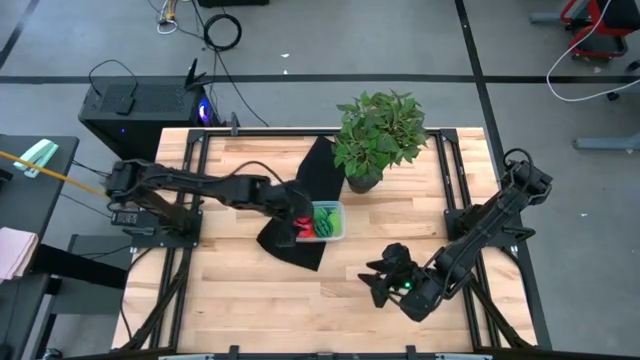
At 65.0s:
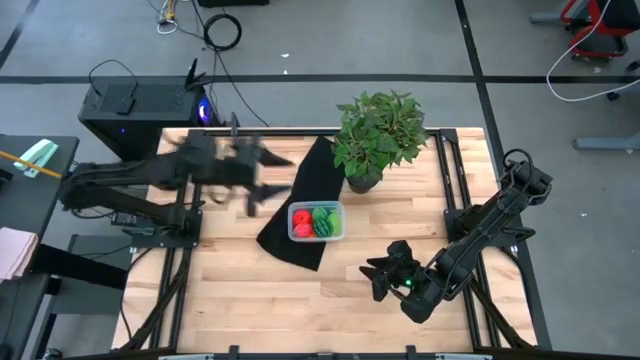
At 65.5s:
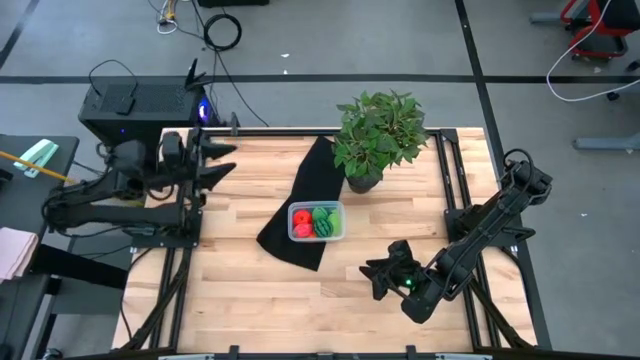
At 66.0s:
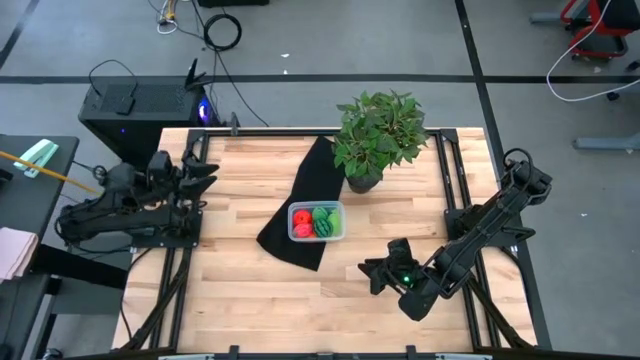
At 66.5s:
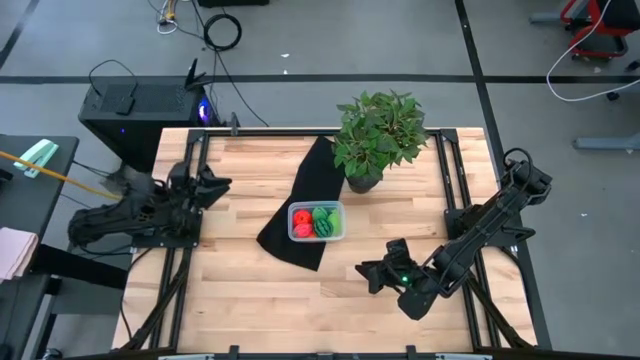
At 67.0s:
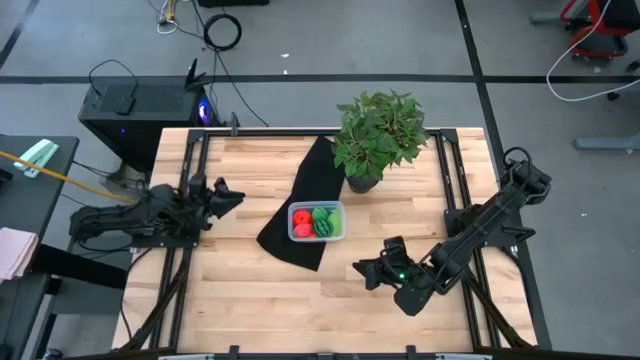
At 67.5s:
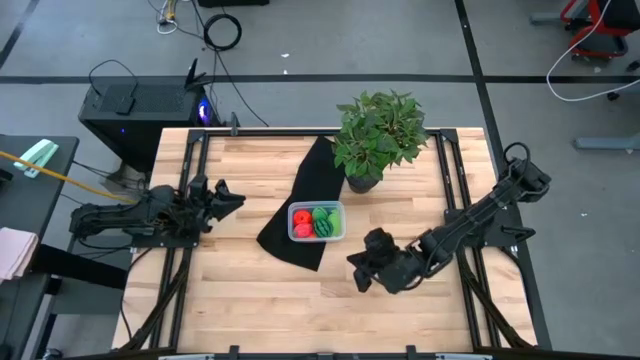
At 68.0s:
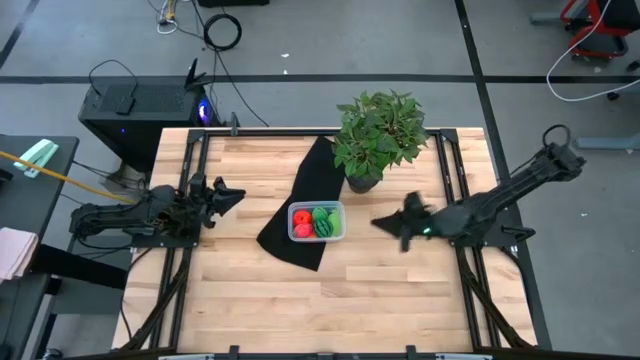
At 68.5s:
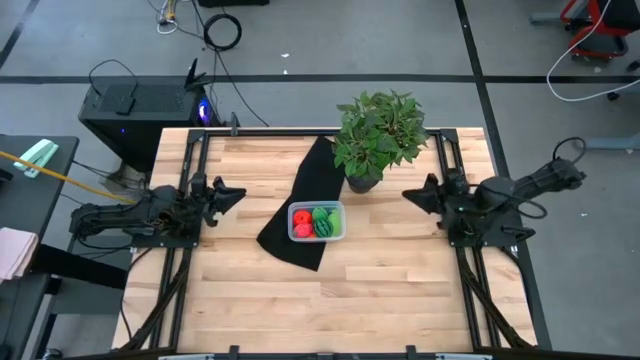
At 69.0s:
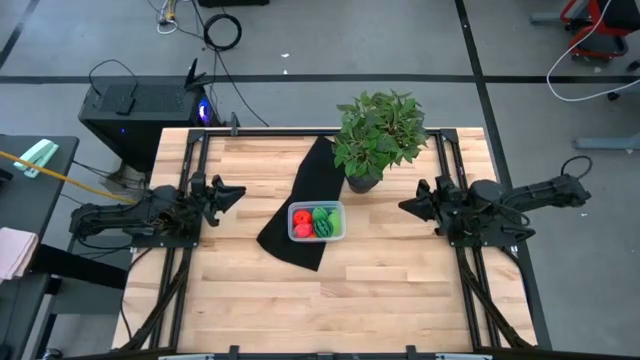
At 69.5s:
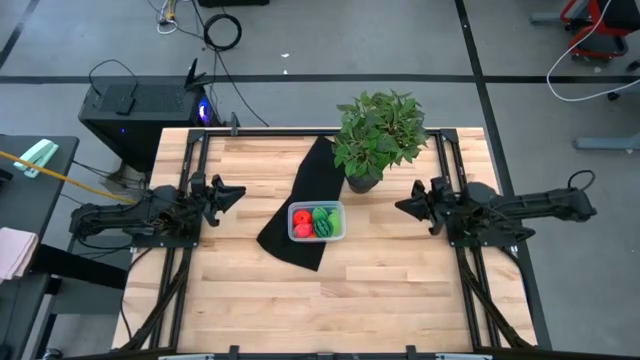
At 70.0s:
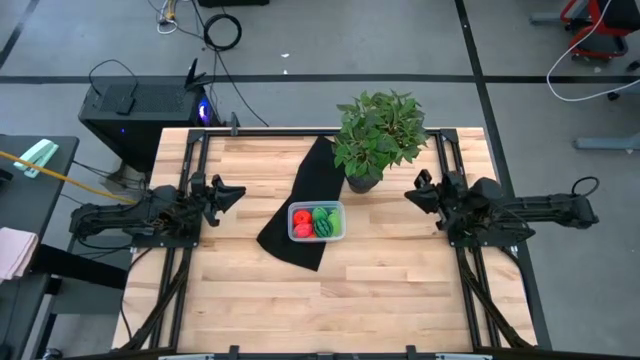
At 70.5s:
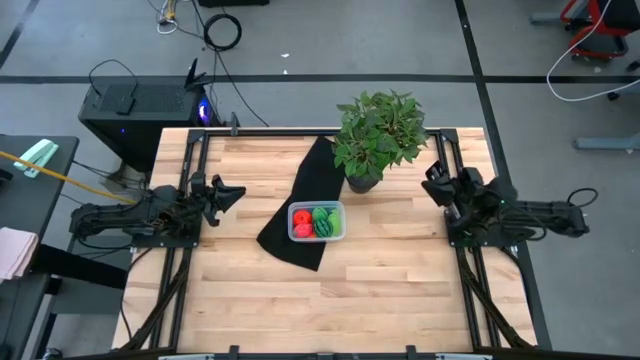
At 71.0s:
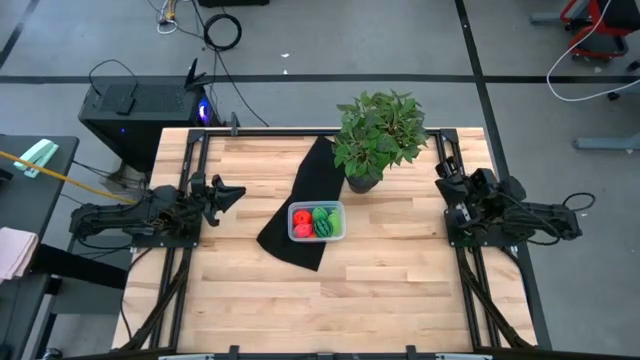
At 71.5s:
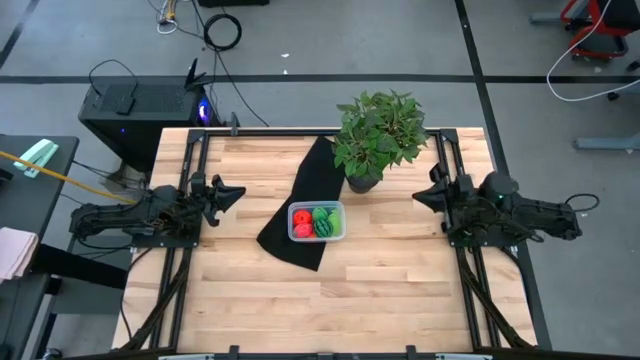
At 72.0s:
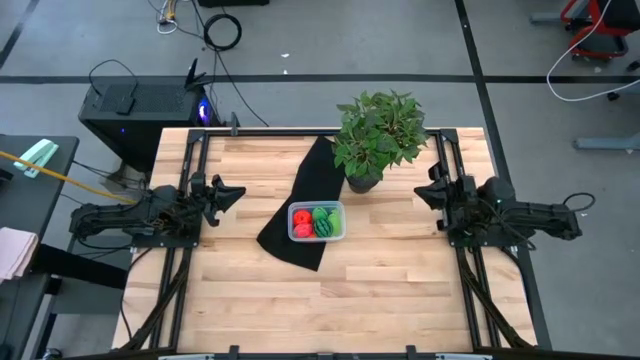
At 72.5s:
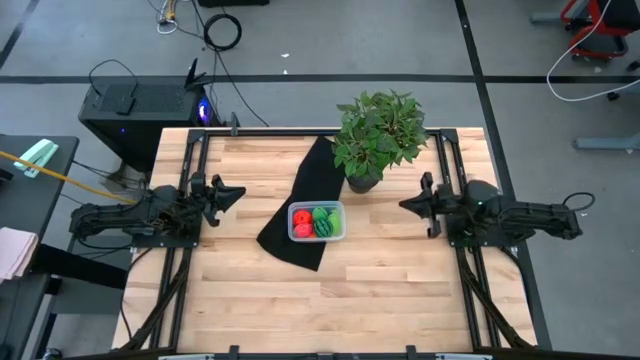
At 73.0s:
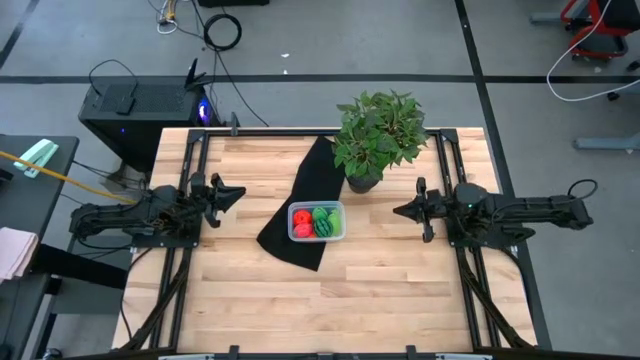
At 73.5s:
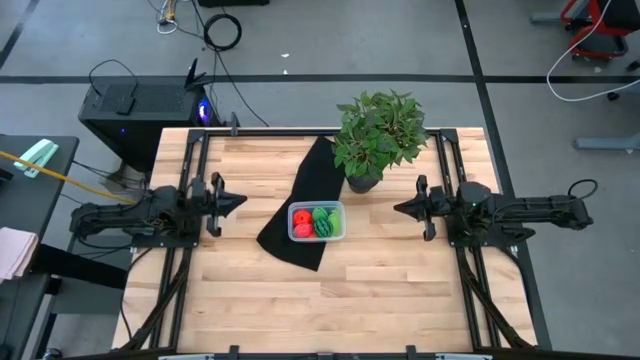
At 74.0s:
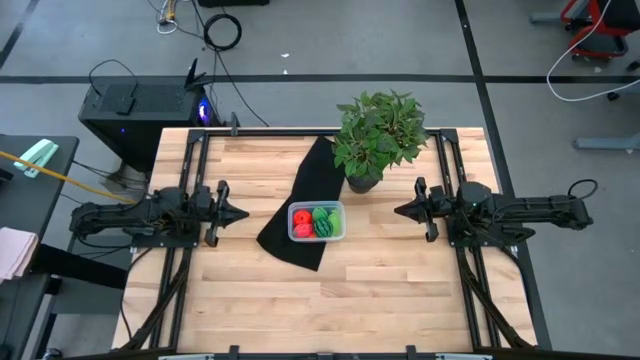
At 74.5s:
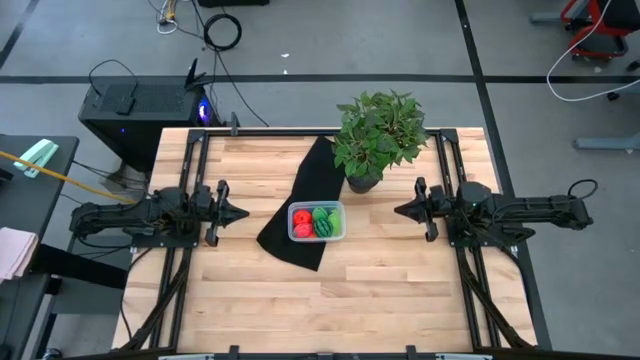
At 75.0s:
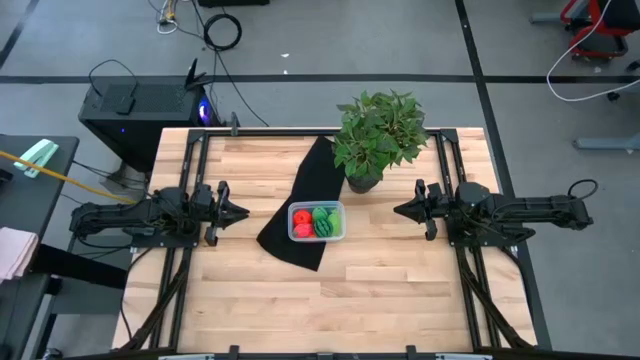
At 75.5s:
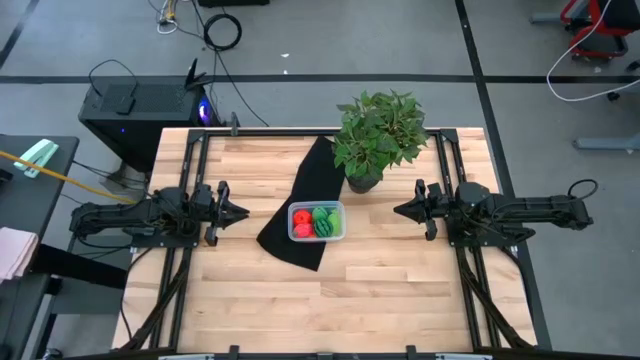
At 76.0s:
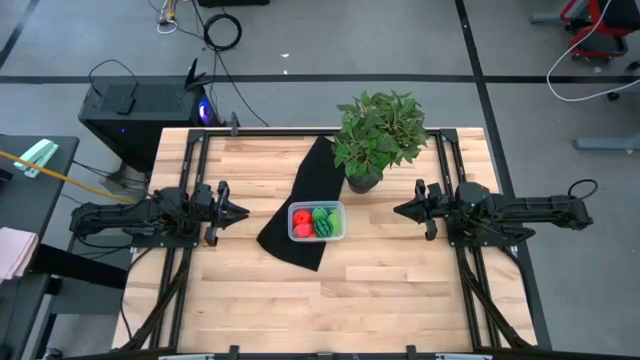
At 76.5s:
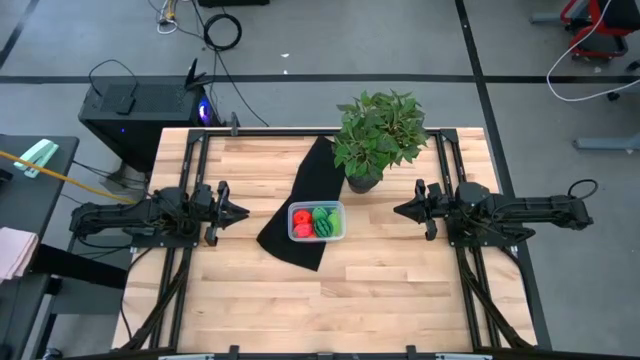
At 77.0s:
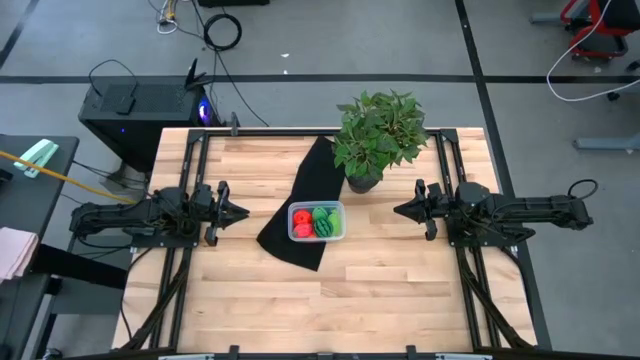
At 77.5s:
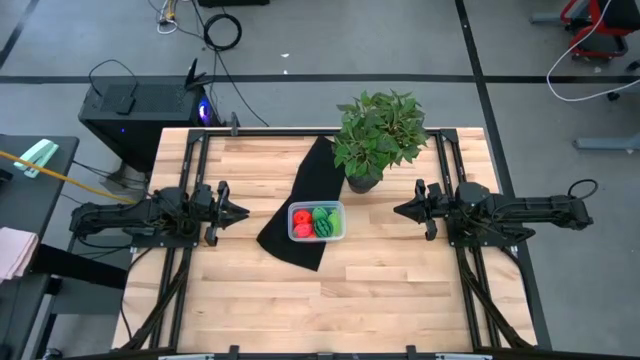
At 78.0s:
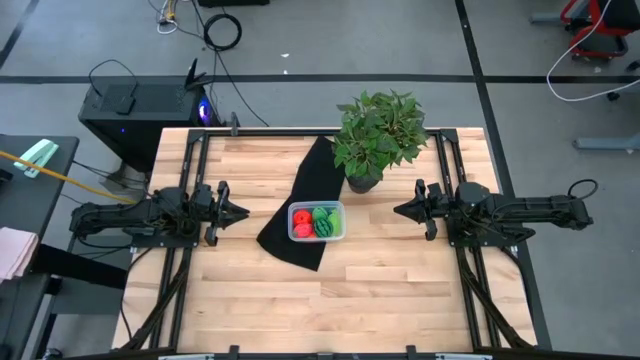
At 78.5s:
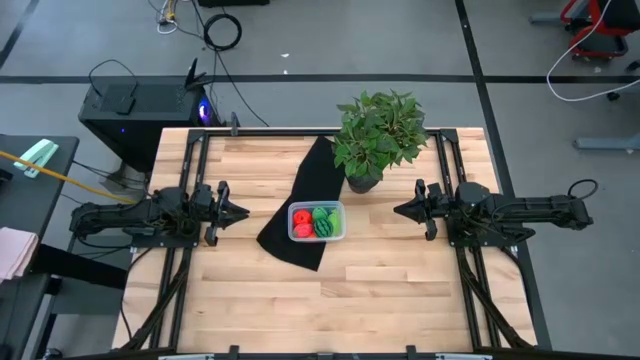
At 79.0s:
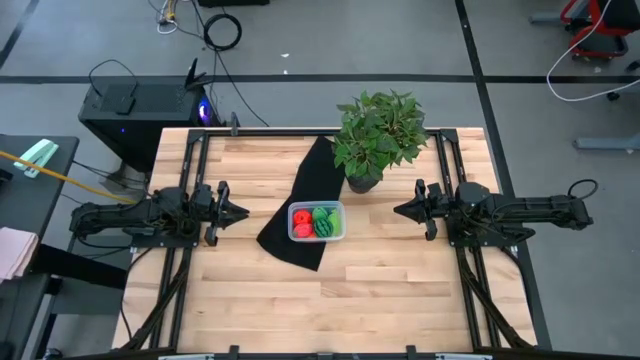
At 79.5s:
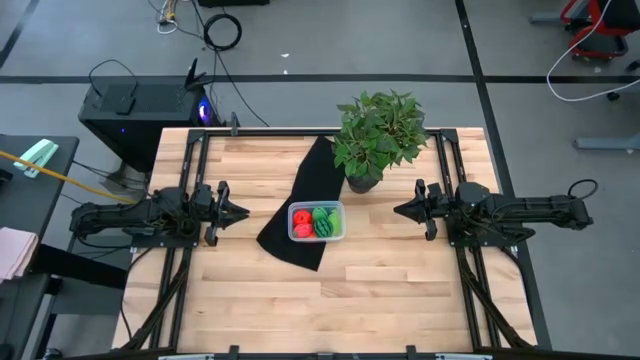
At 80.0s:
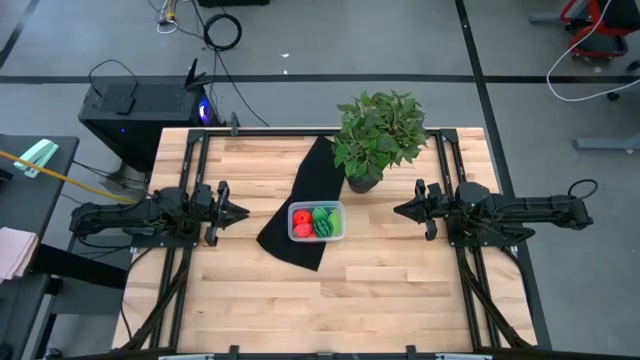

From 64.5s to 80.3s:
Task: Pick and placing Produce into tupperware
Return to Home Position

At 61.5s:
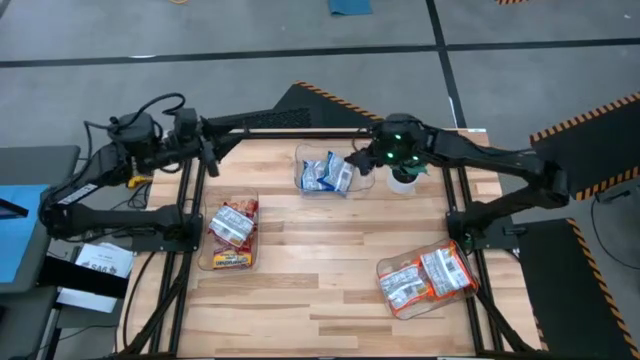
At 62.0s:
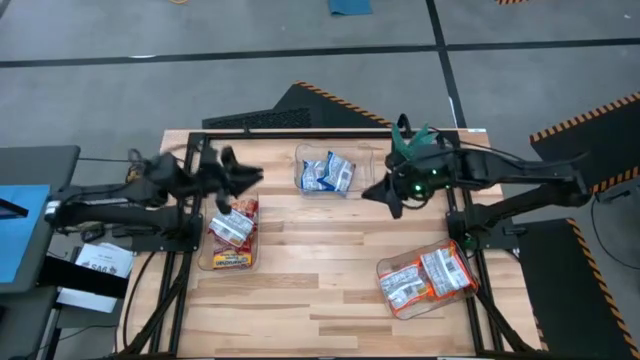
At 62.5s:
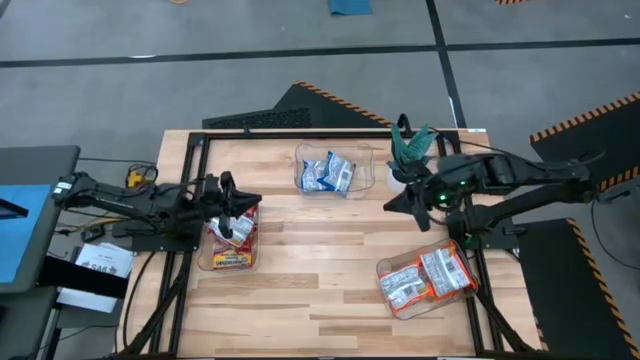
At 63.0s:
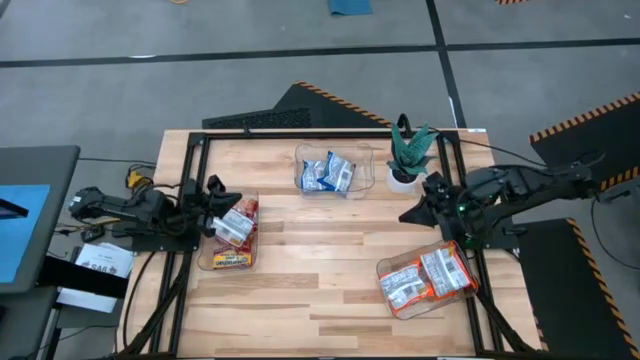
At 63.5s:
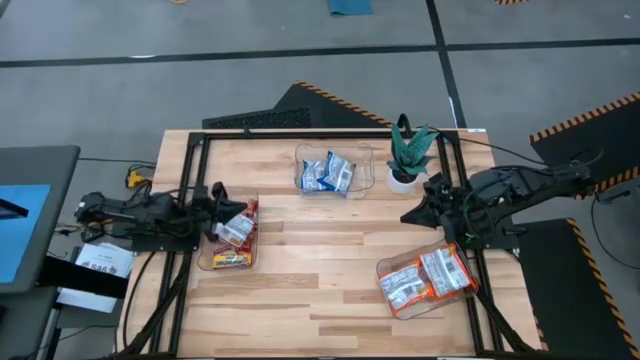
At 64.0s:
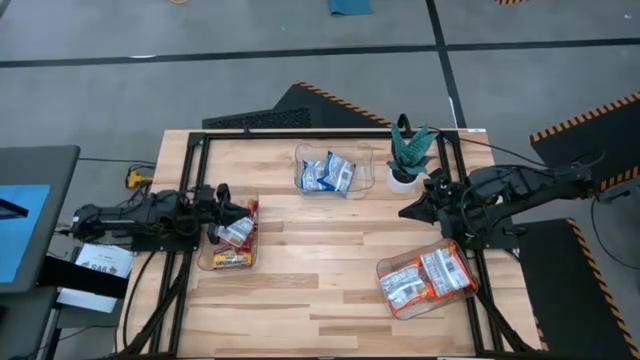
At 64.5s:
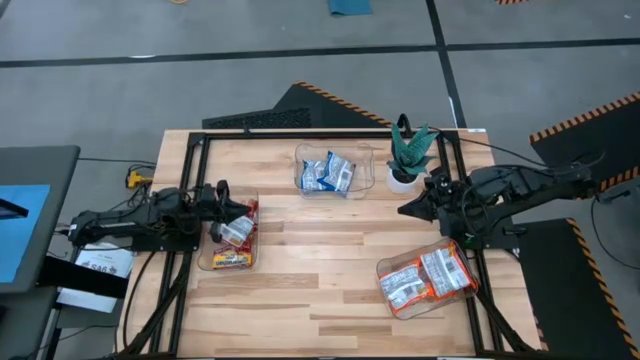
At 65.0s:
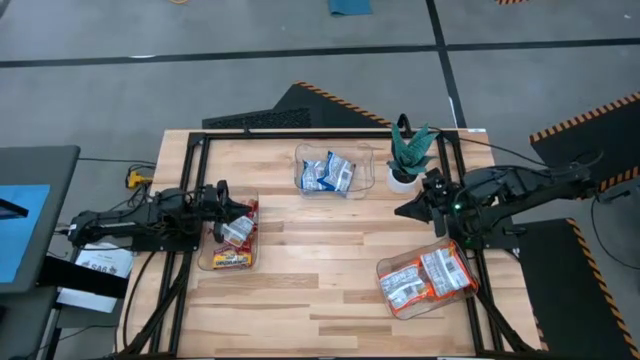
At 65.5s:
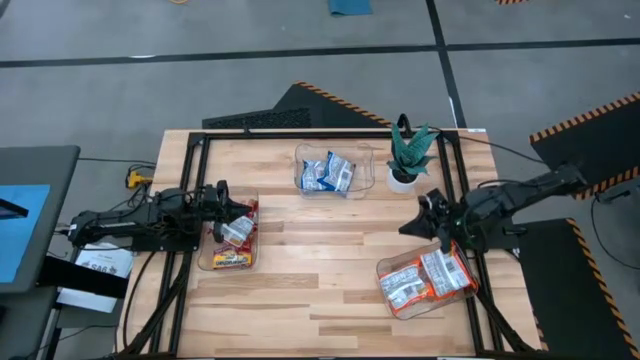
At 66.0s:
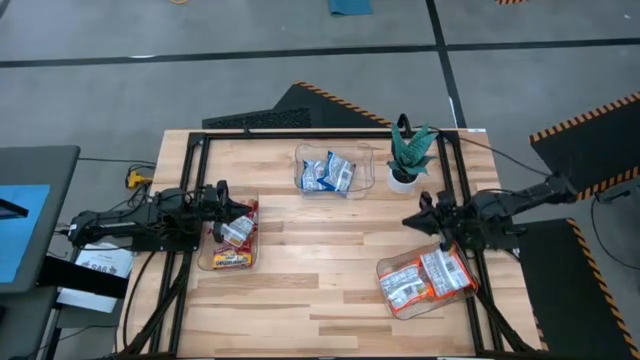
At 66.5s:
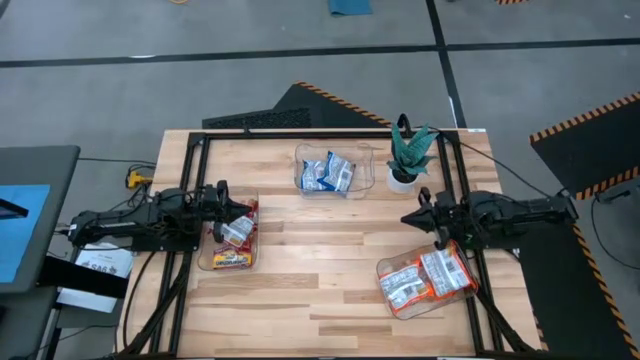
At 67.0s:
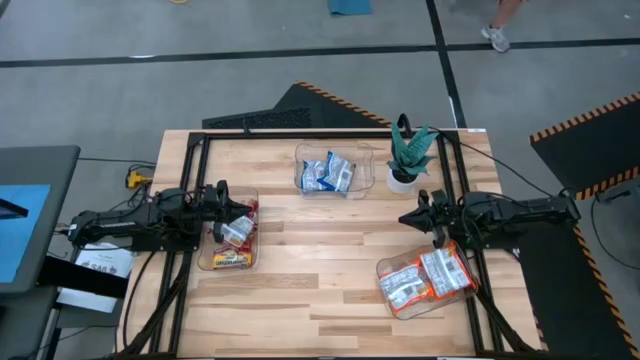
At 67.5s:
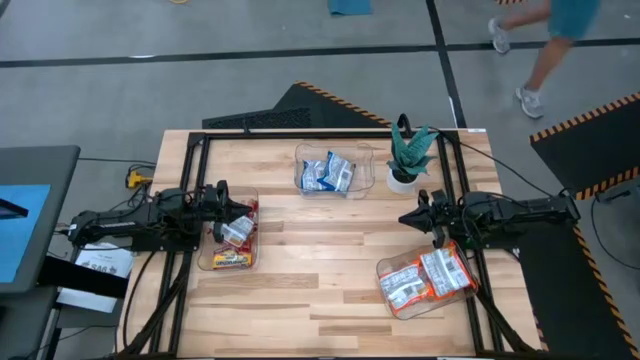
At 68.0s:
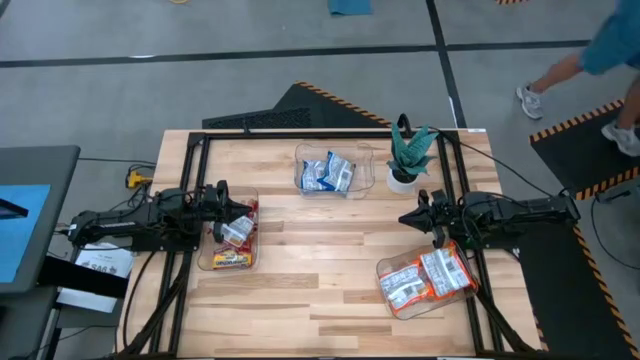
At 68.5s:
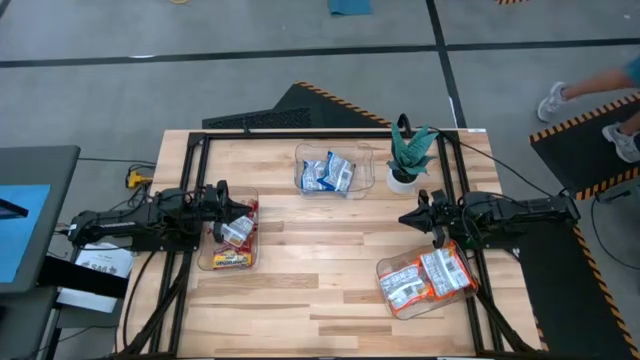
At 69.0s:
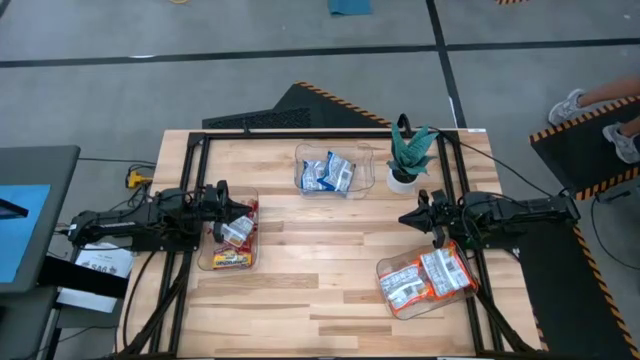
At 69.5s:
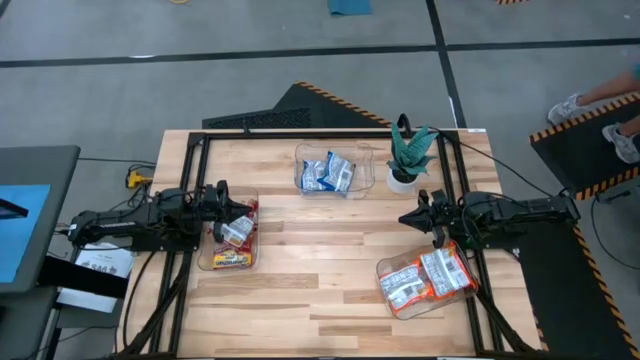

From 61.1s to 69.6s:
Task: Sort Maruchan noodles
Return to Home Position
